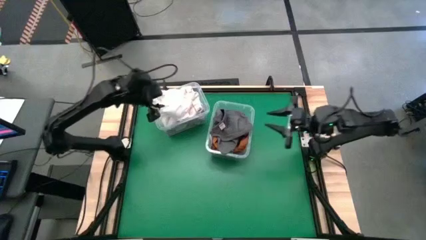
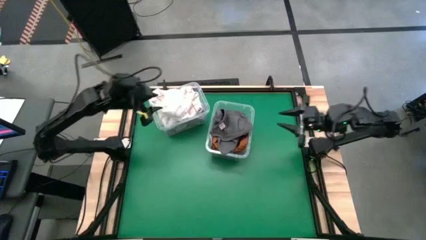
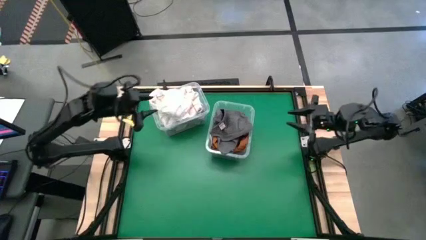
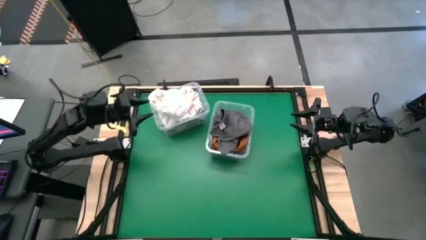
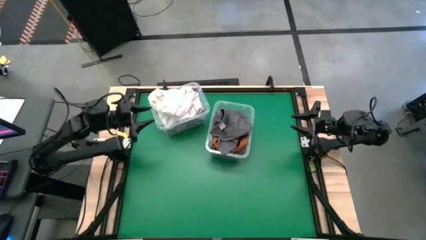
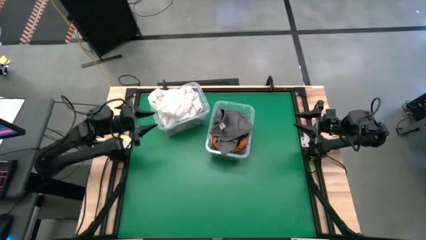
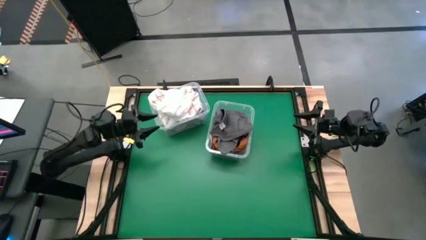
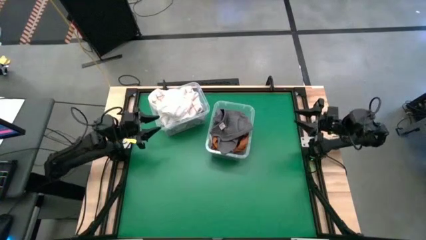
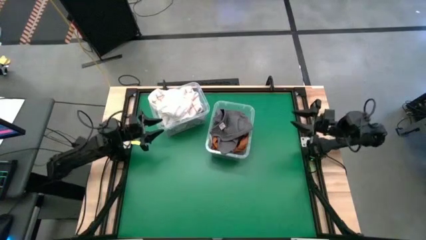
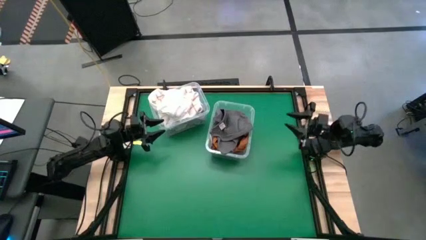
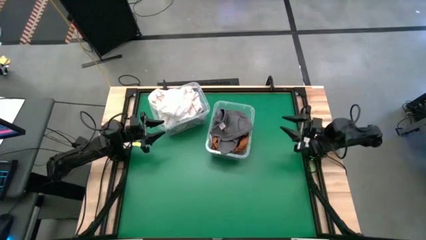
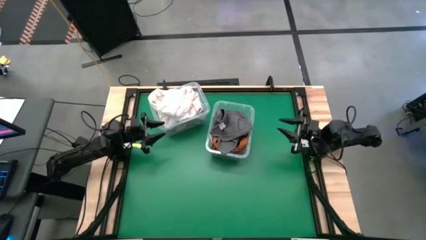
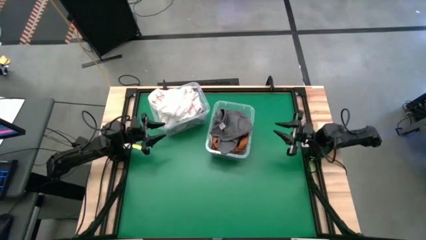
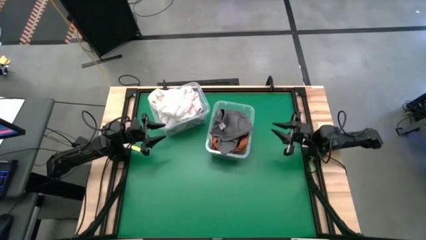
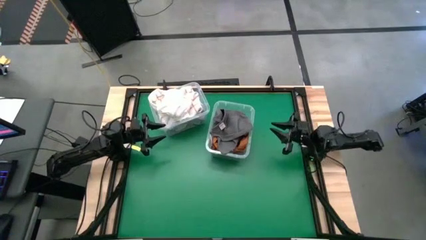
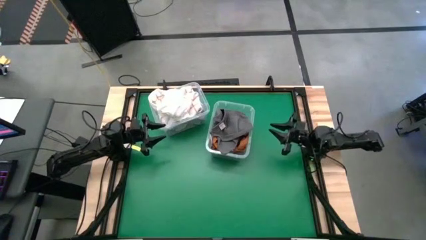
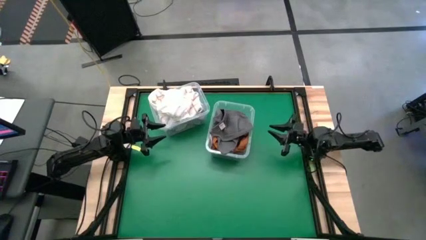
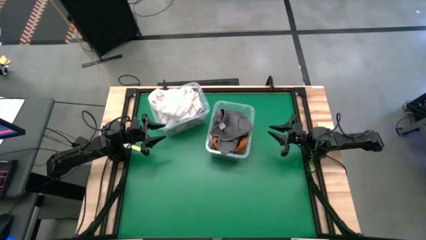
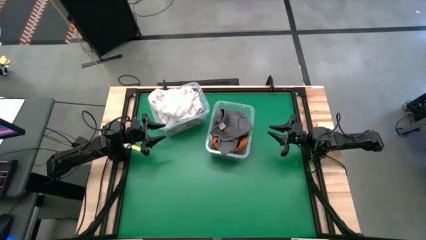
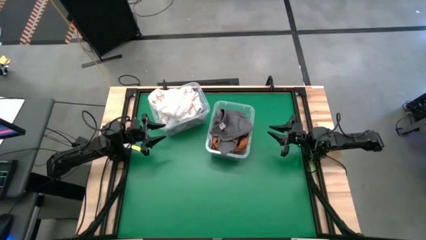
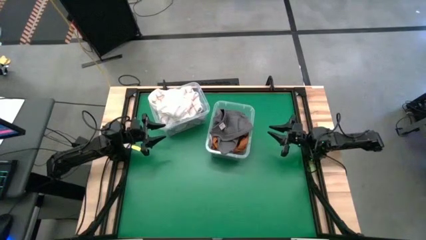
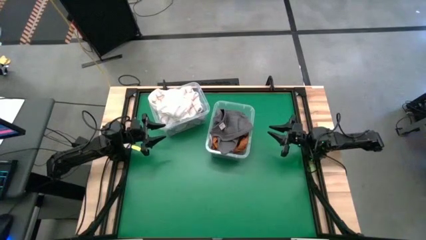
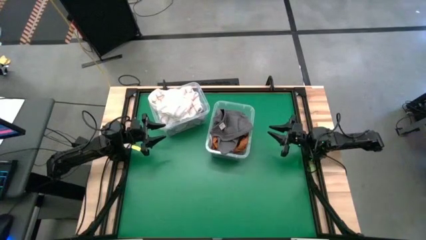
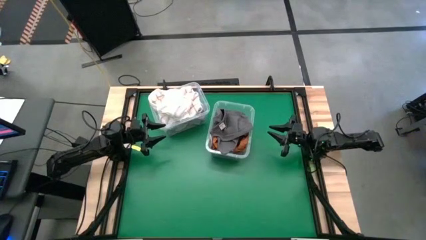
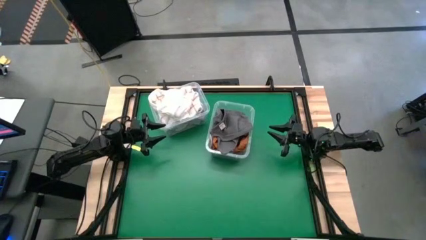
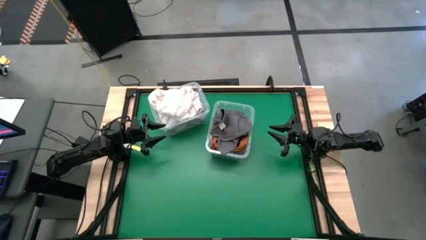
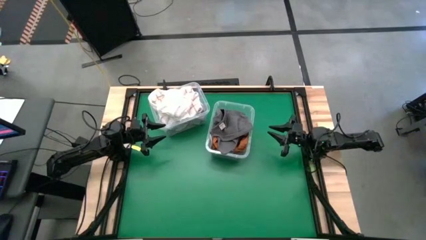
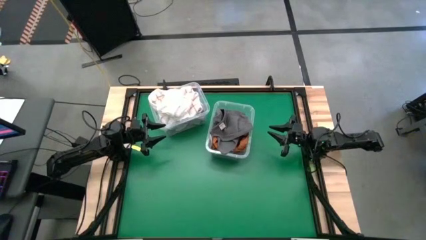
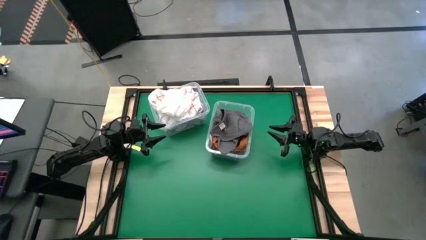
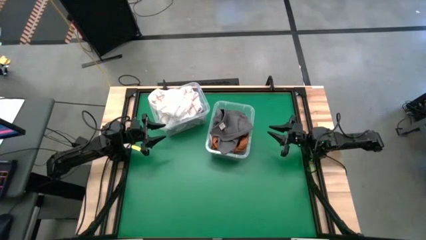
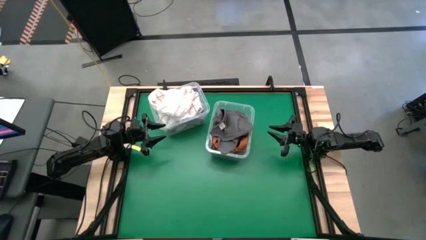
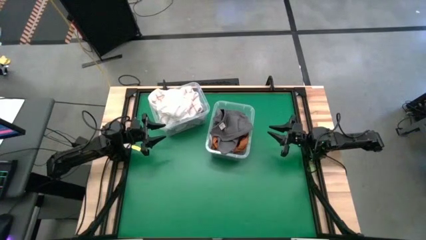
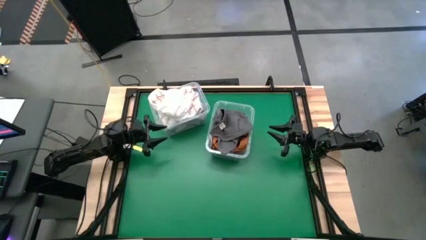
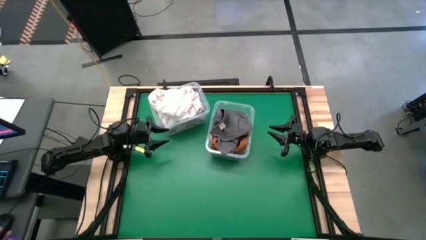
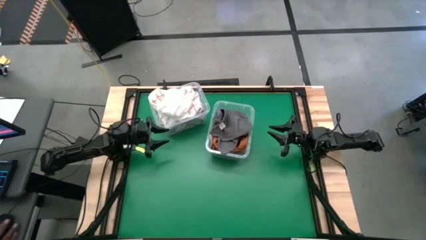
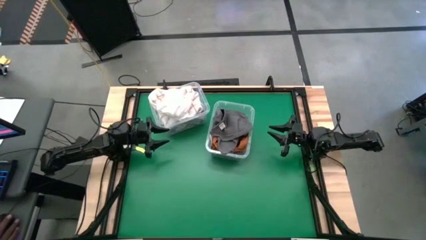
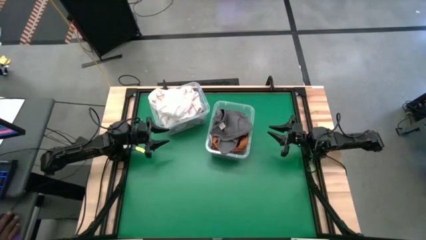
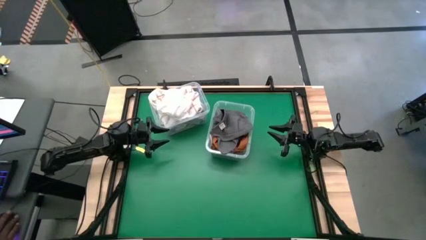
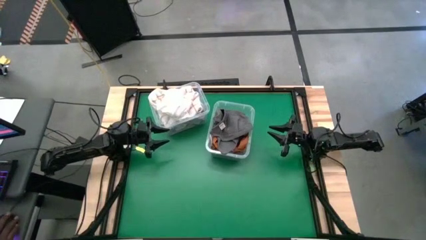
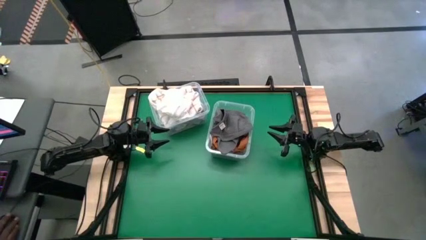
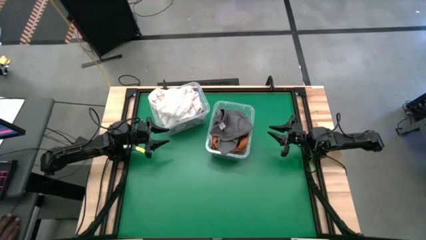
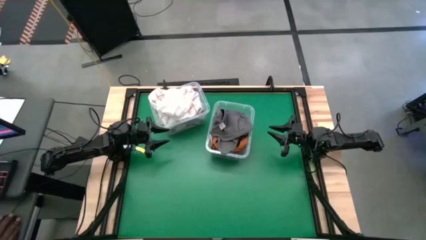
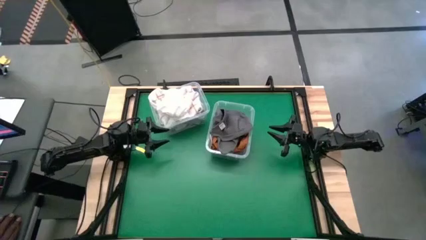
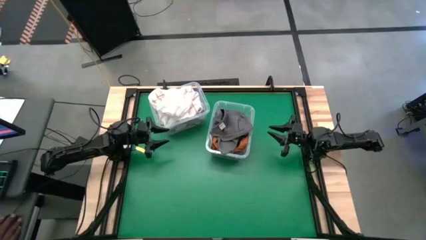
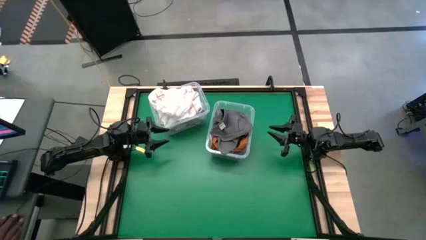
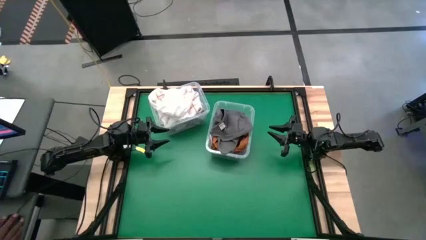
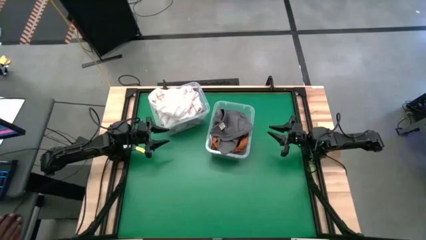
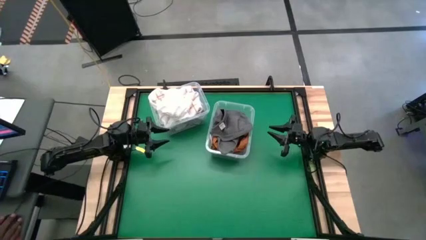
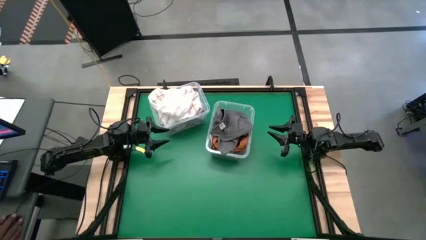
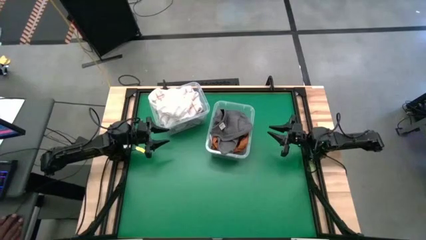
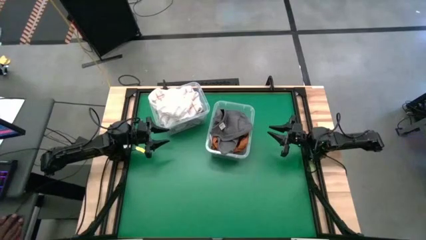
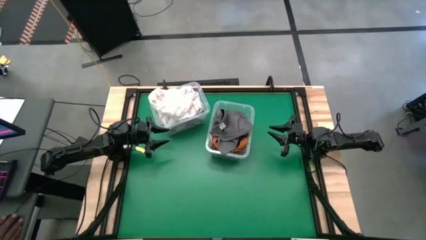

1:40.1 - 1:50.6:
Task: Sort towels by color in basket
Return to Home Position

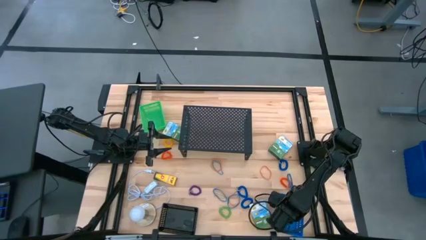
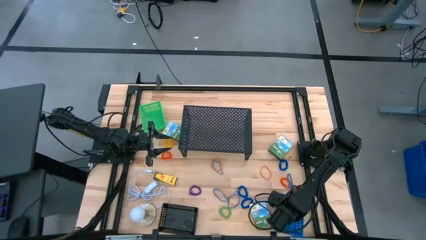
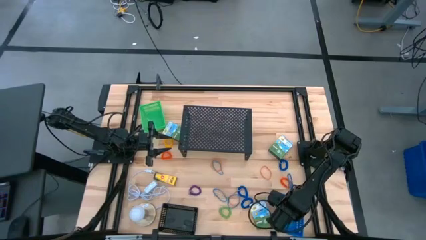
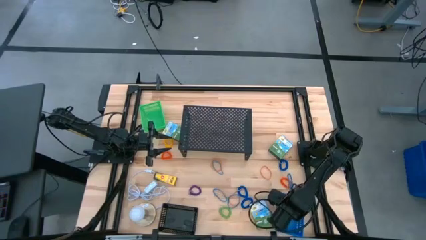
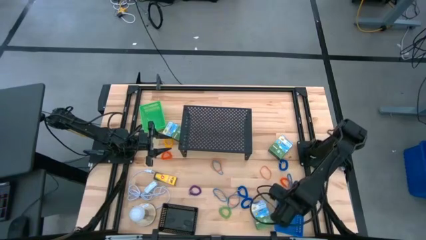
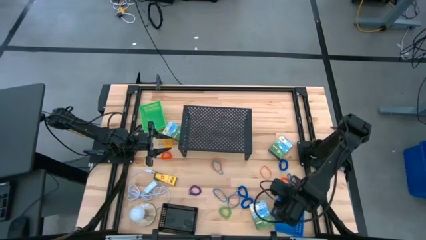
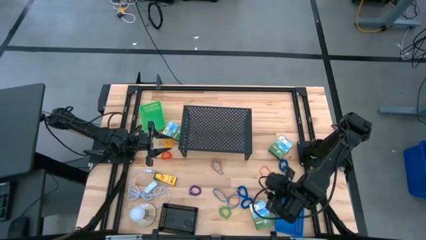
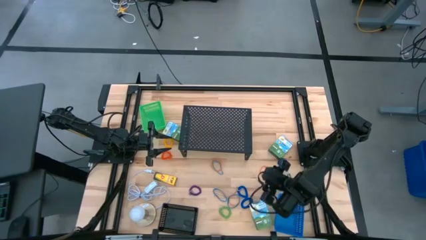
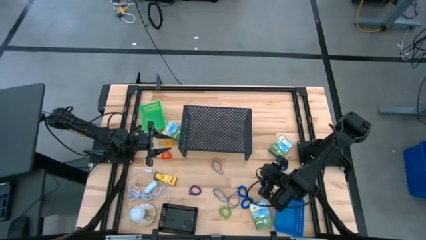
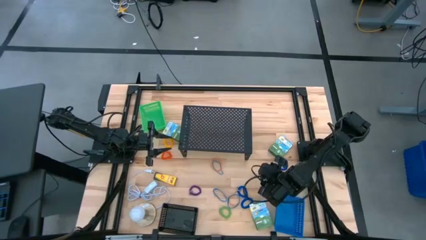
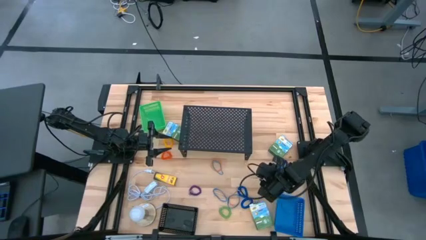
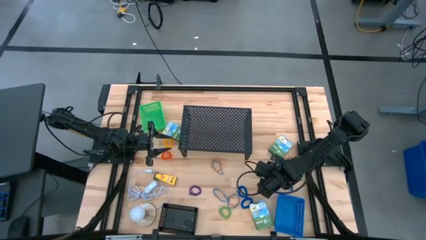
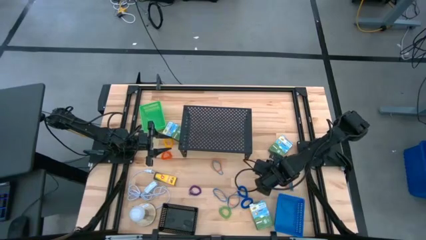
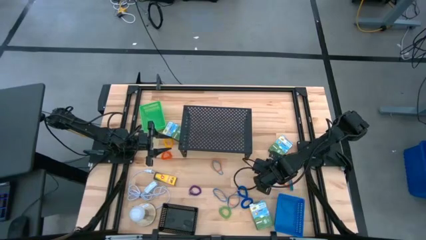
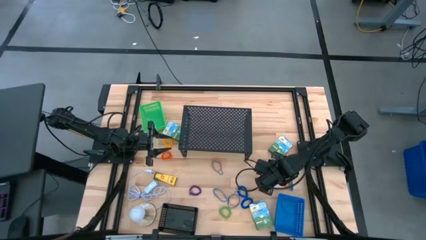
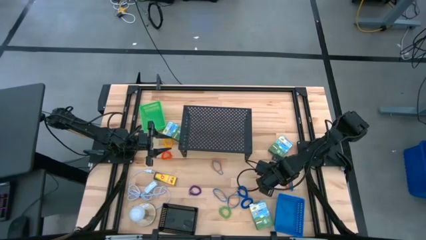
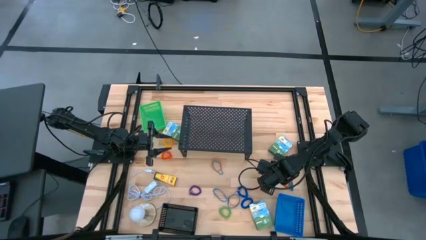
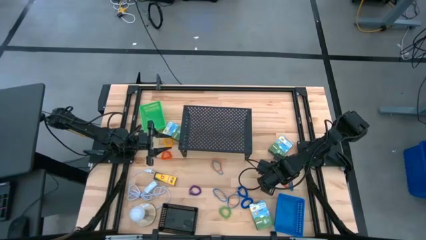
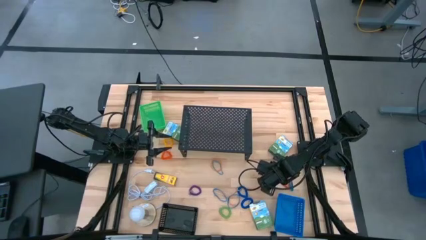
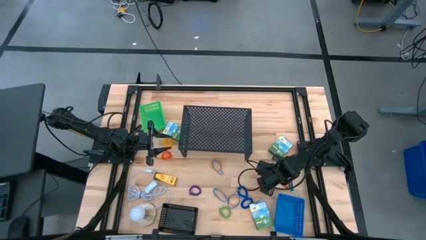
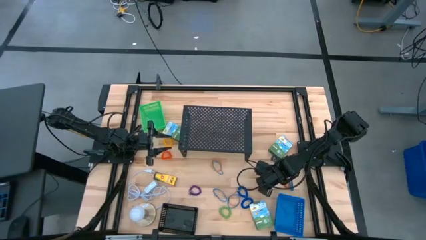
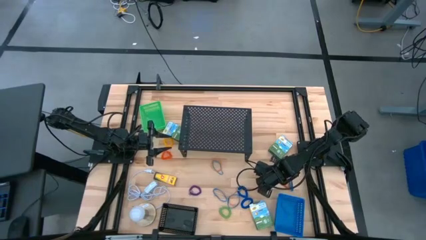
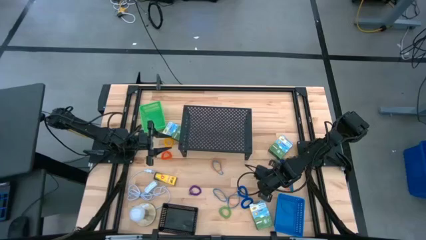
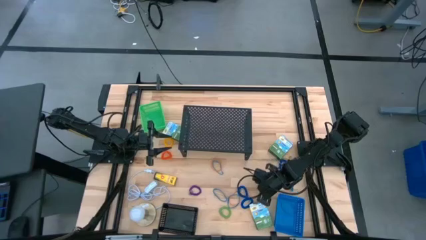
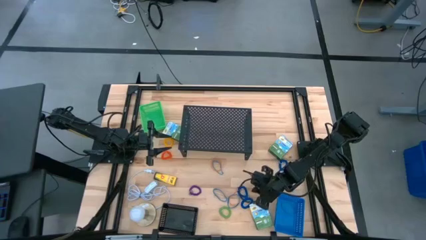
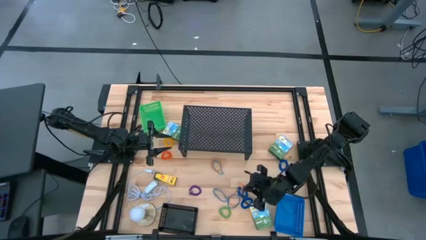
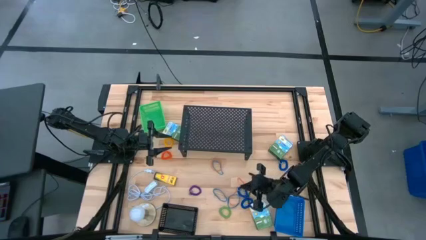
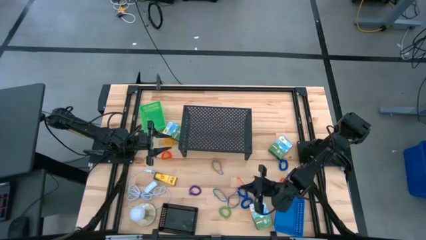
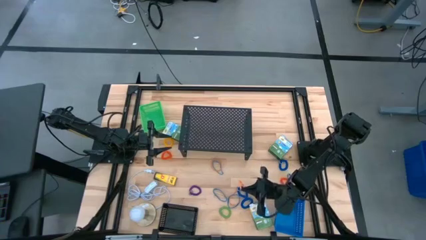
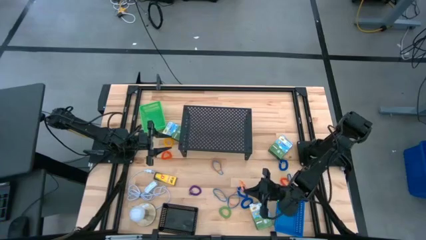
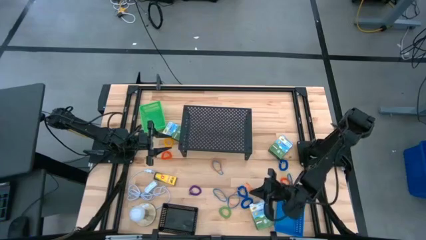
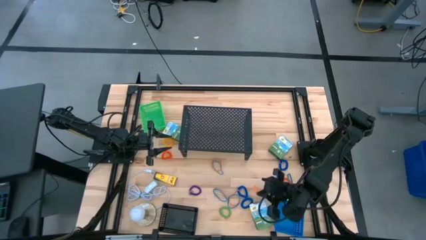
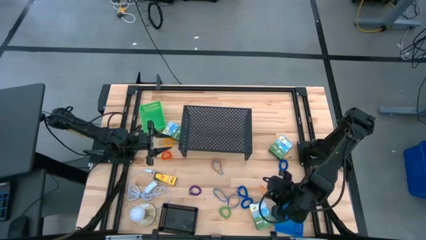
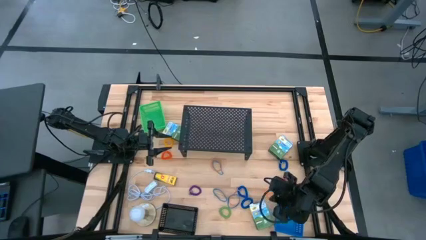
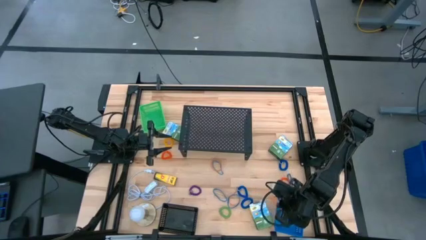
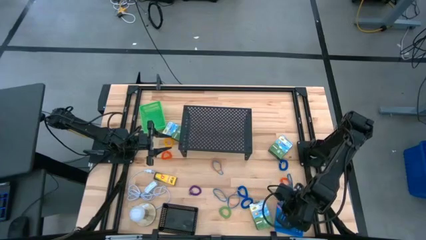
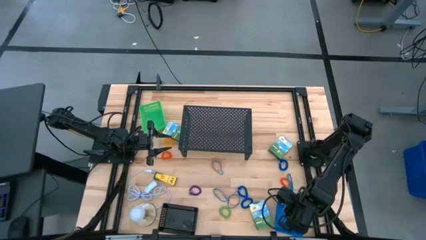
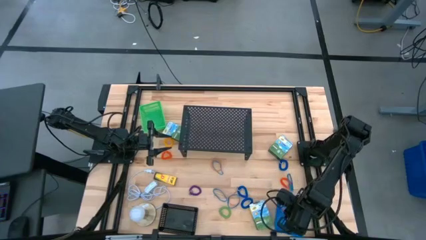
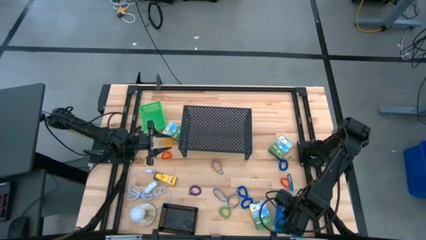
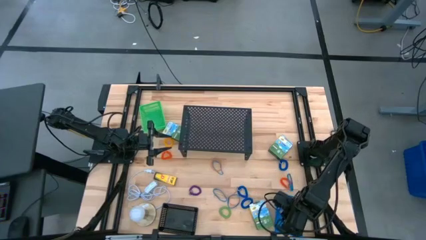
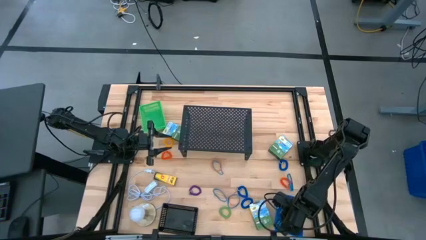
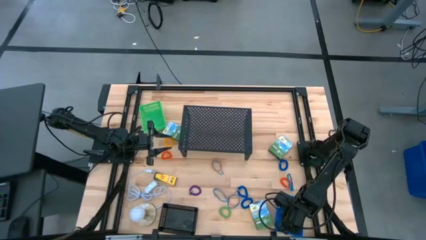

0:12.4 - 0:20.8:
Task: Pick & Place Office Desk Supplies
Put the orange rubber band into the blue bin
